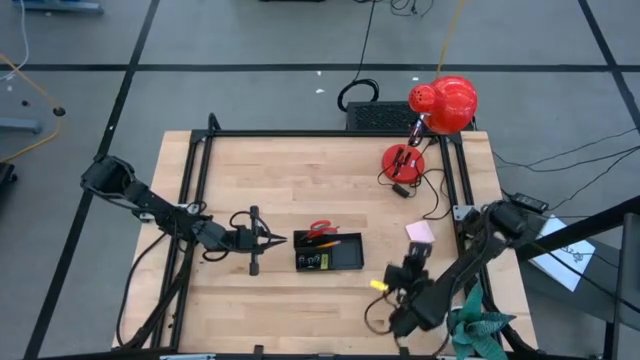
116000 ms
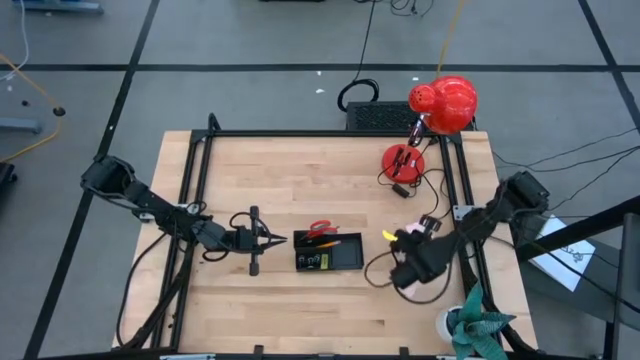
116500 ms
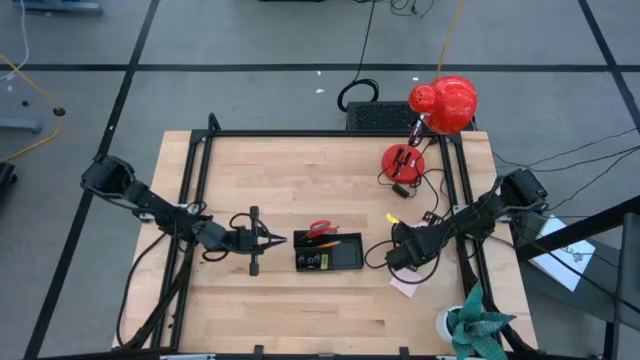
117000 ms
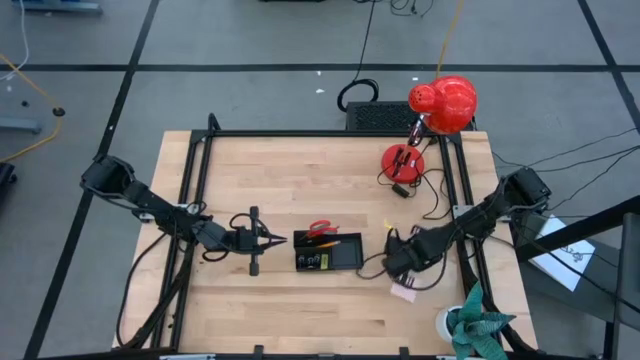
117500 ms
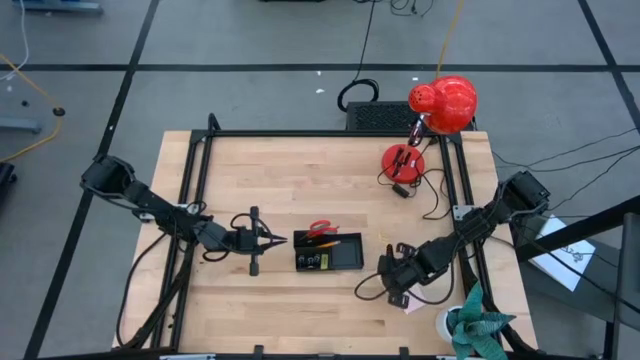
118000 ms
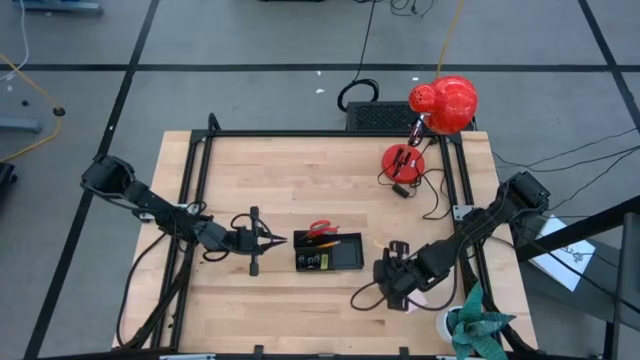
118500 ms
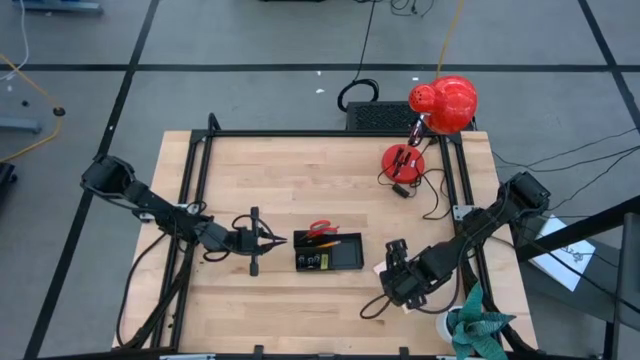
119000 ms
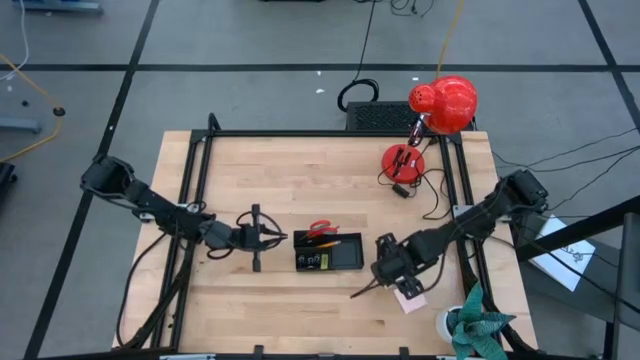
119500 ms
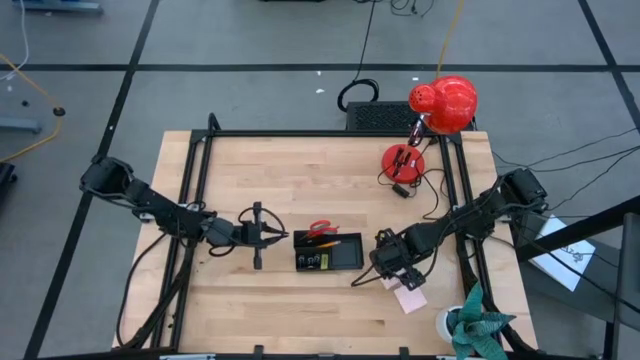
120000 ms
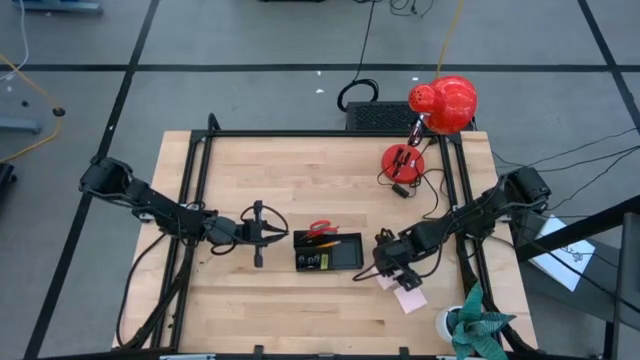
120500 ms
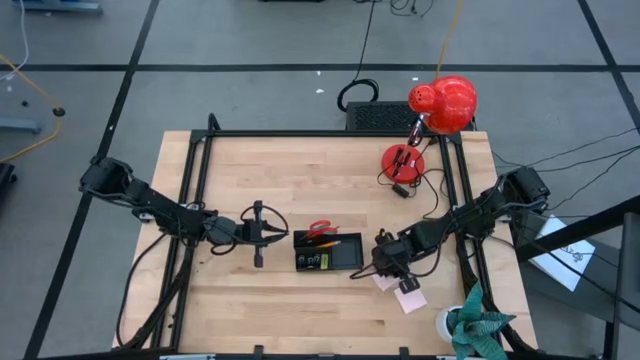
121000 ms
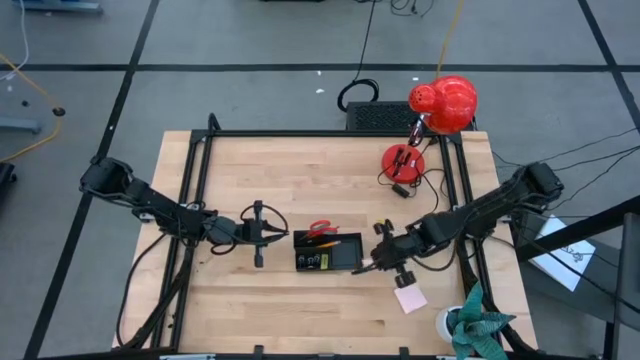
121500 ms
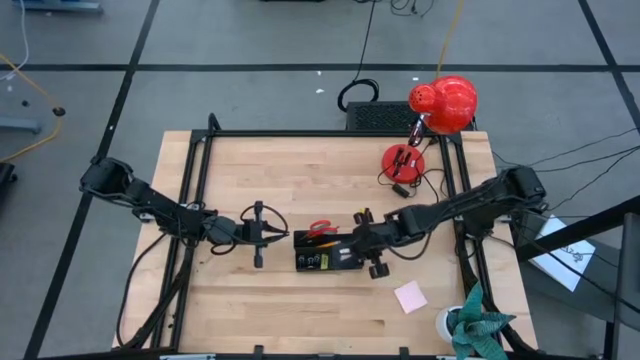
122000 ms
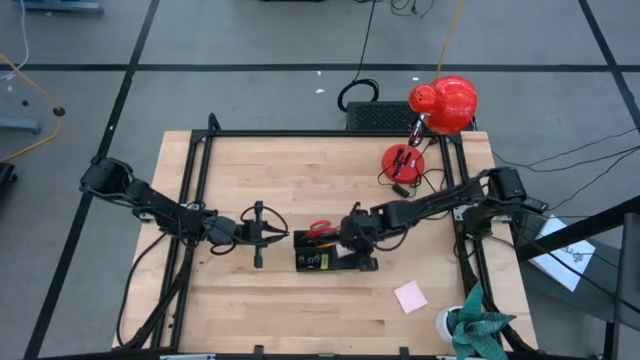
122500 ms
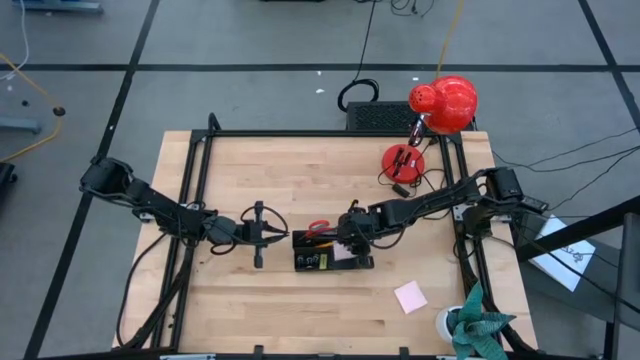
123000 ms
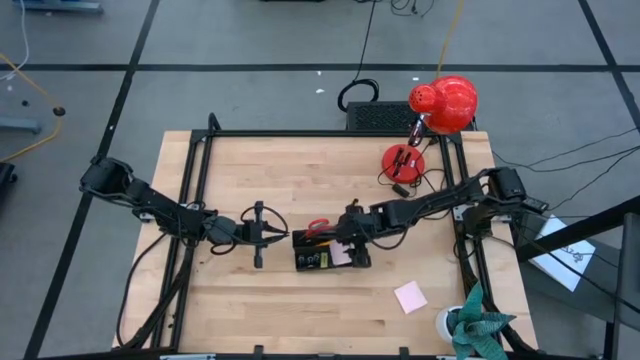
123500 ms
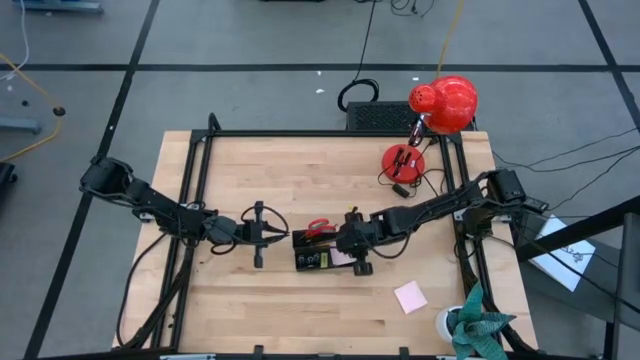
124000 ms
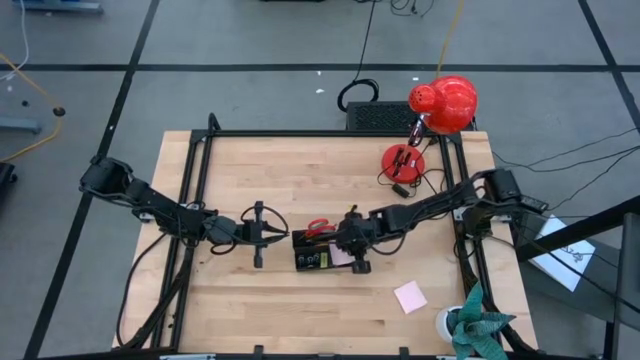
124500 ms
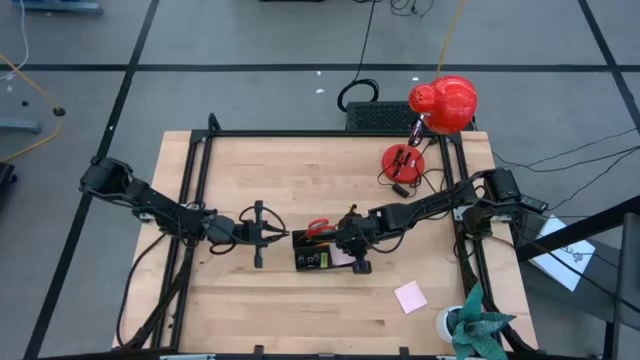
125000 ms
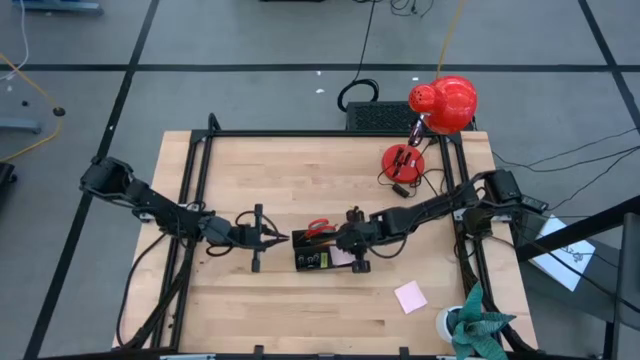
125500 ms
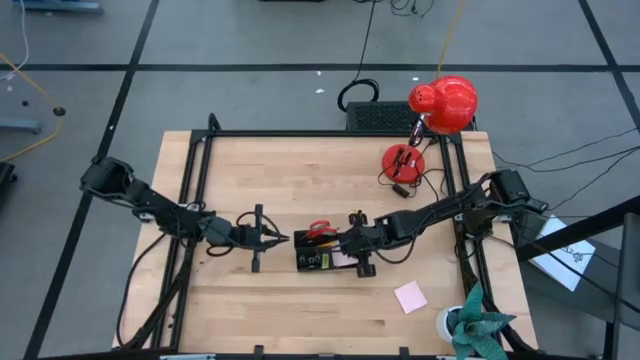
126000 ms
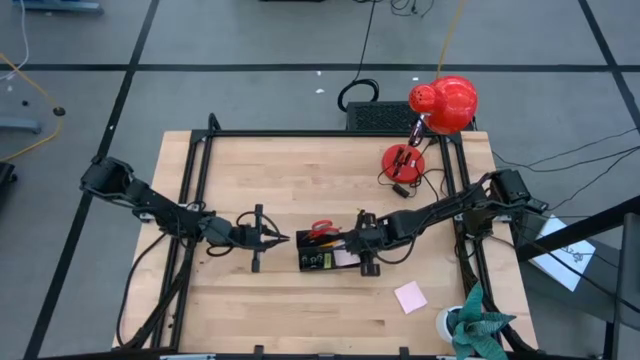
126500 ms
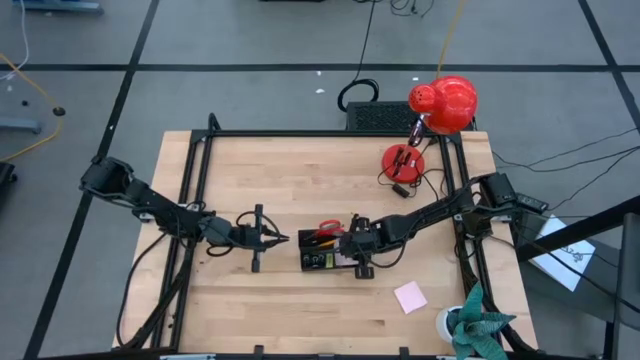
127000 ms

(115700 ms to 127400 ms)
Task: Pick and place office supplies into organizer
Put the pink sticky notes into the black desk organizer

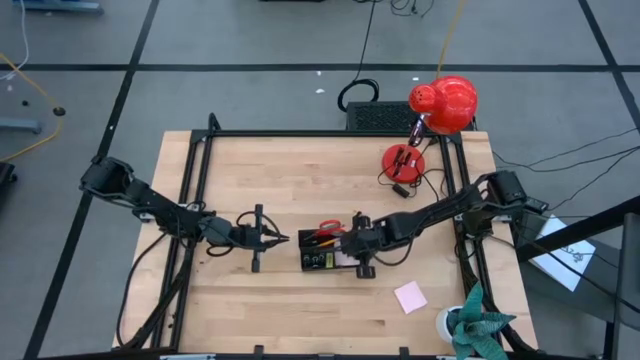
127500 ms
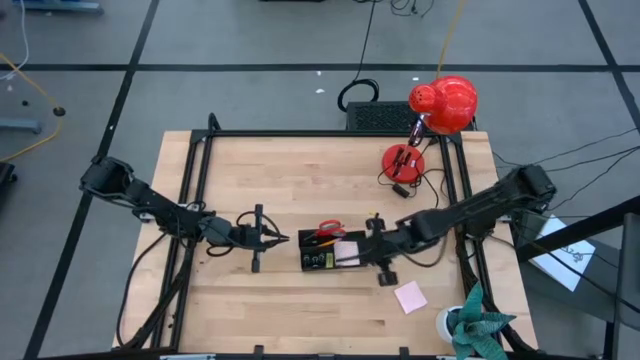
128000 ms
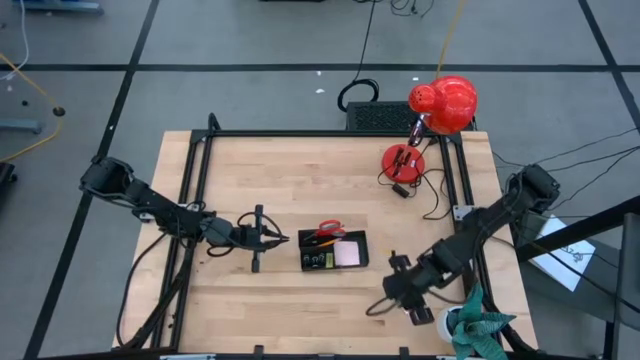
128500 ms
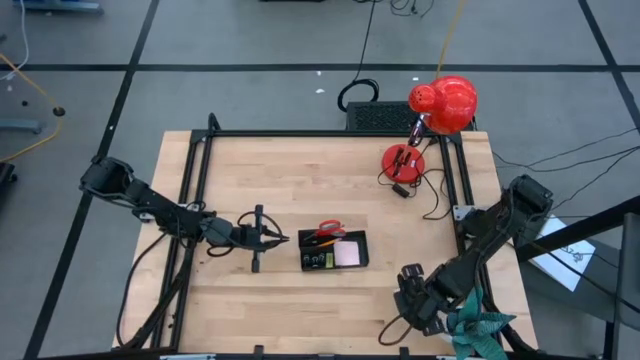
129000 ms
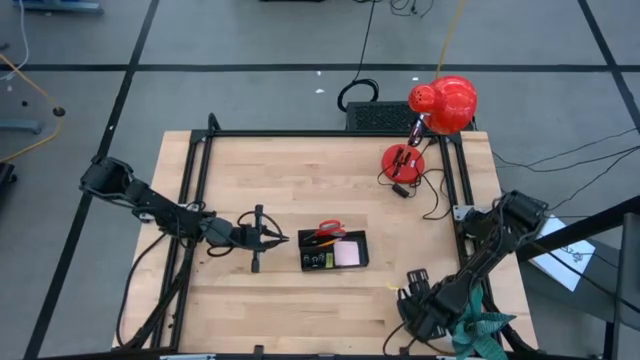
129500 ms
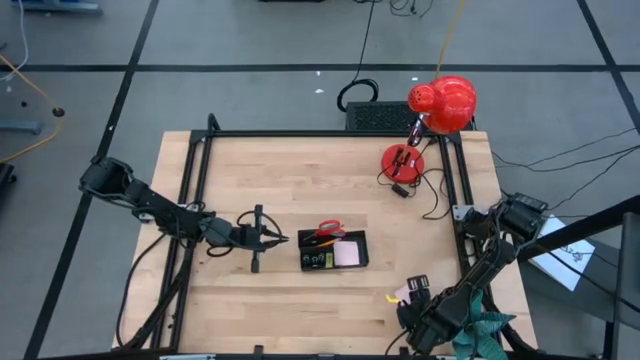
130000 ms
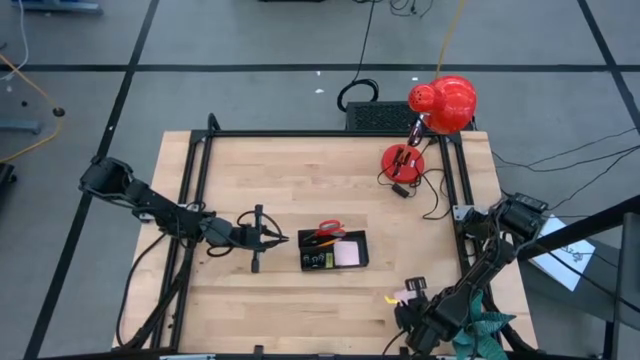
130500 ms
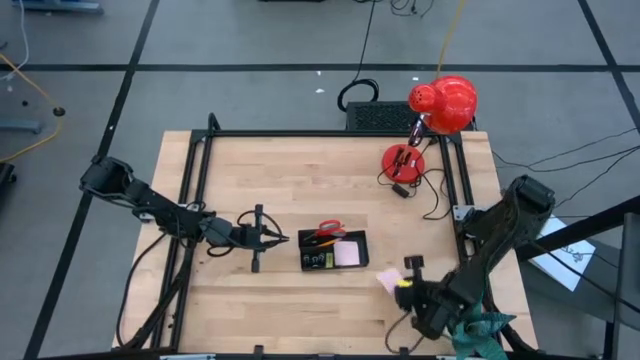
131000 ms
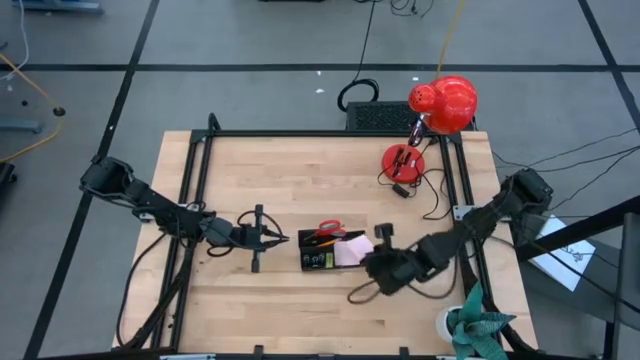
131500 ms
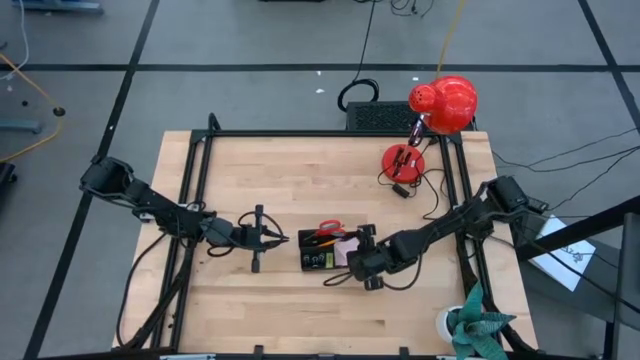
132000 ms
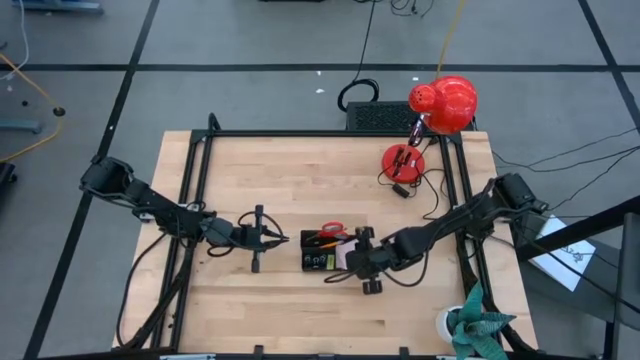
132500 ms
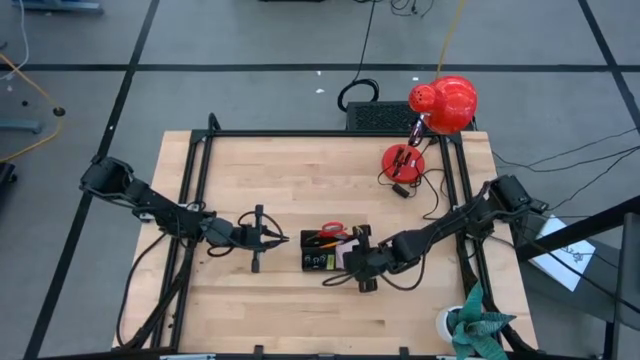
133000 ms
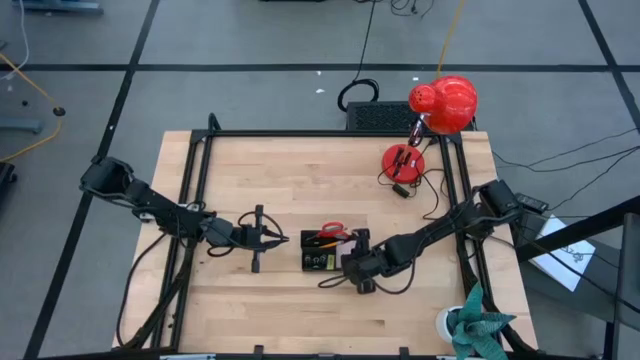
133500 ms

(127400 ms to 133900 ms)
Put the pink sticky notes into the black desk organizer

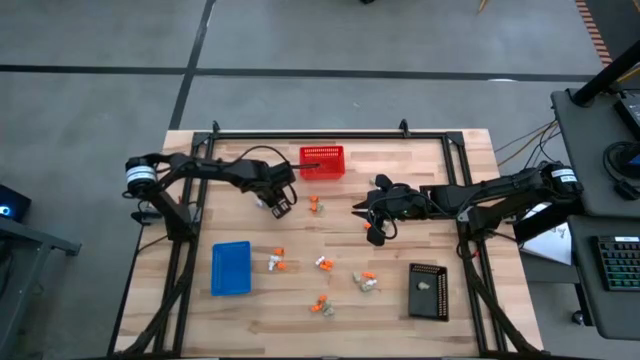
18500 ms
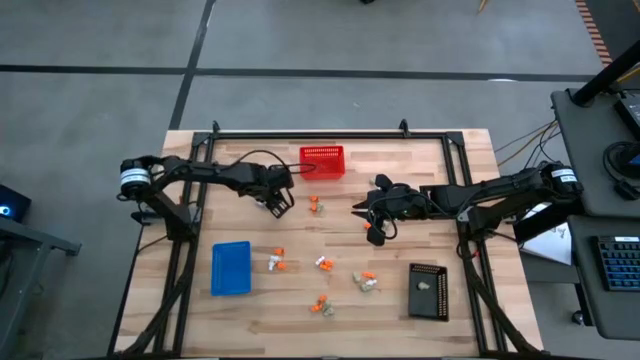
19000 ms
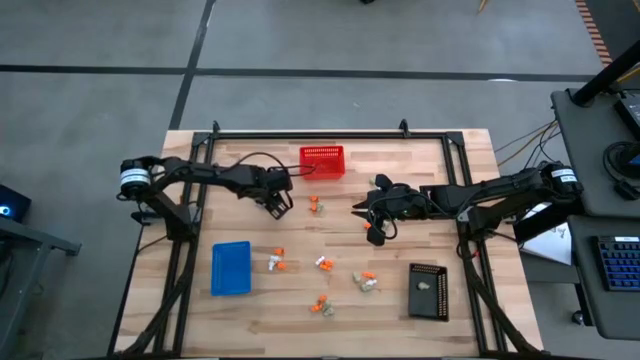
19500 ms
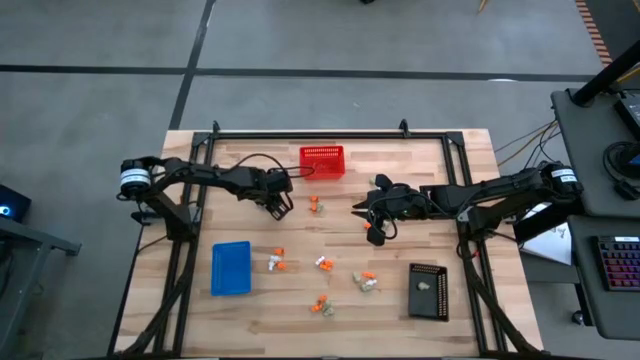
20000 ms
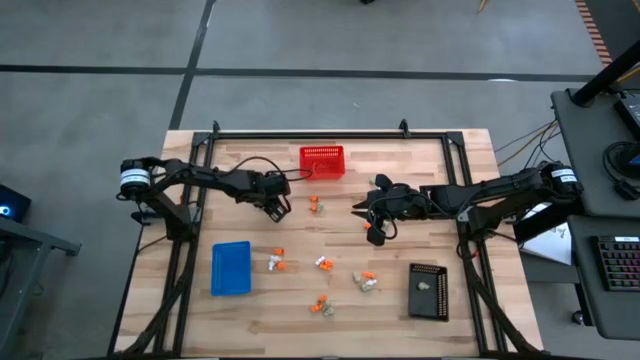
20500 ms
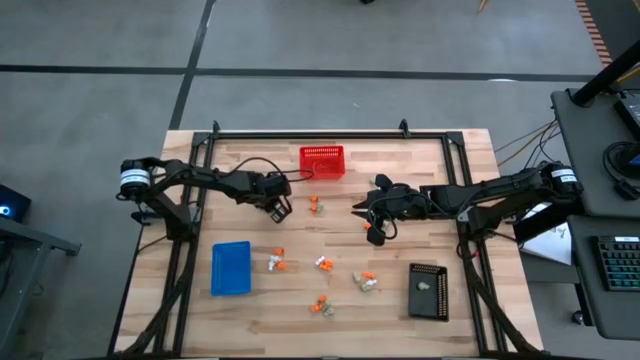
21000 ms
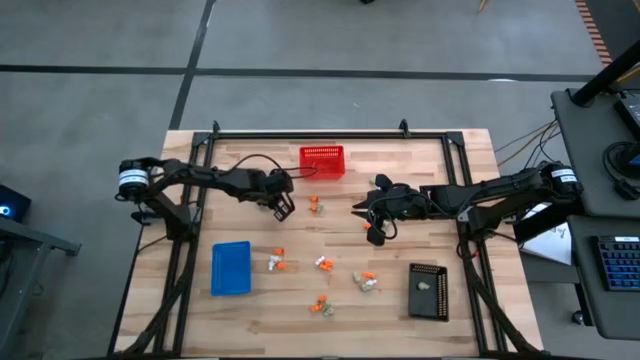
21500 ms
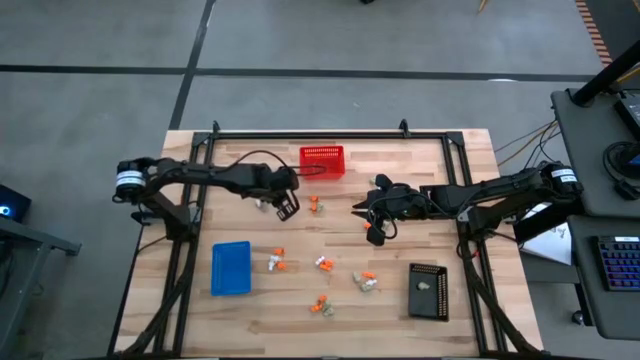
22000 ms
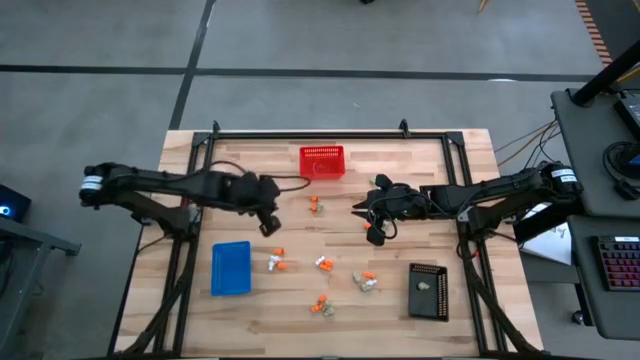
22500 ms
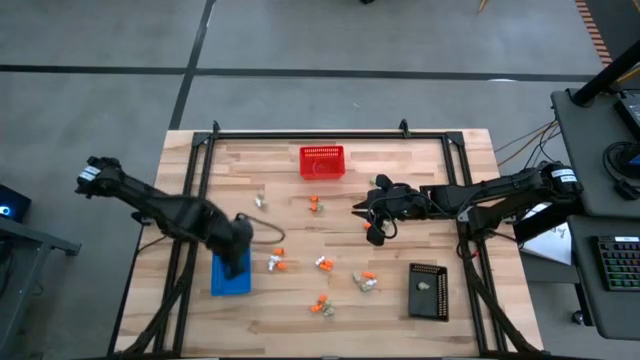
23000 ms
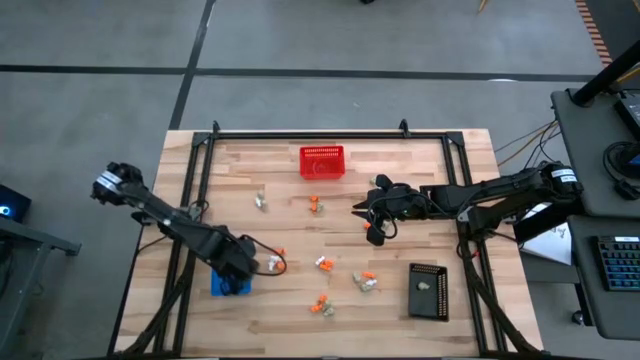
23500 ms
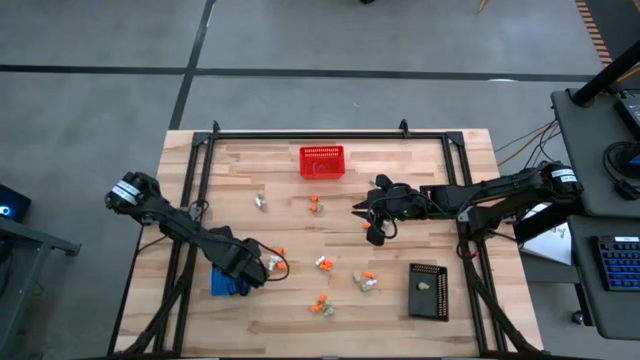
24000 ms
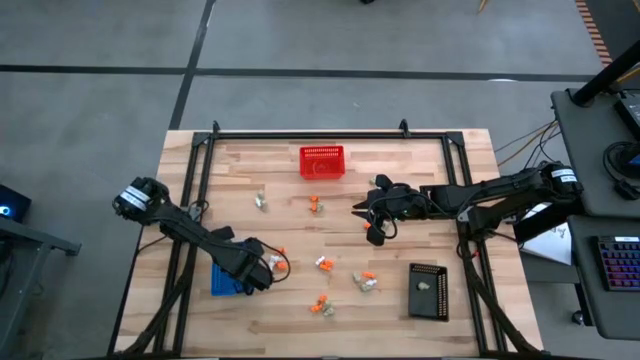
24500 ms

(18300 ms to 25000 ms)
Task: Sort Halloween decoration
Put the white skeleton toy into the blue bin
